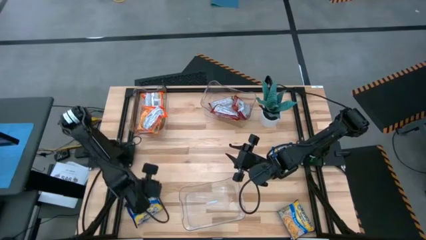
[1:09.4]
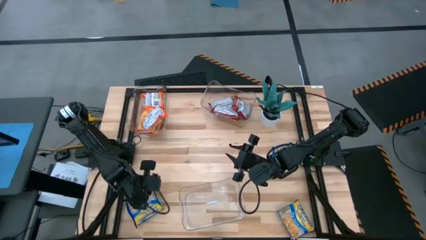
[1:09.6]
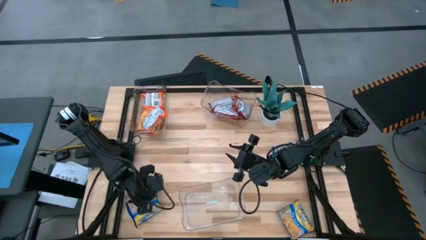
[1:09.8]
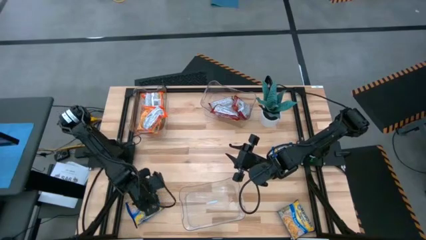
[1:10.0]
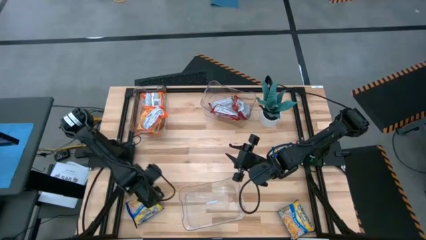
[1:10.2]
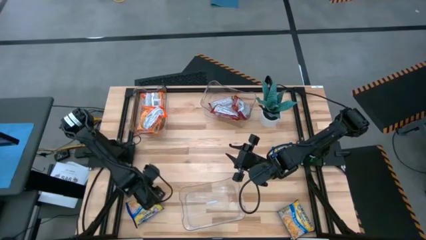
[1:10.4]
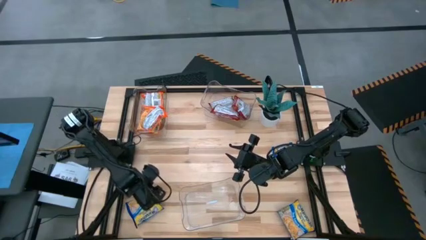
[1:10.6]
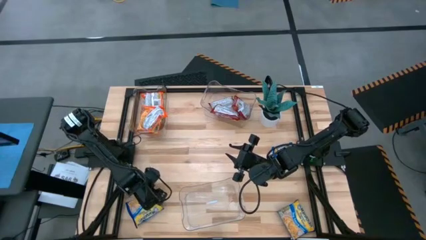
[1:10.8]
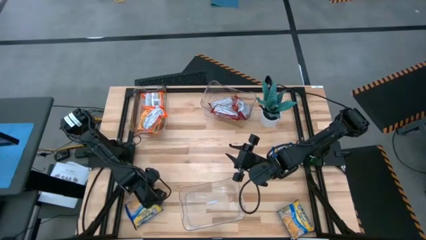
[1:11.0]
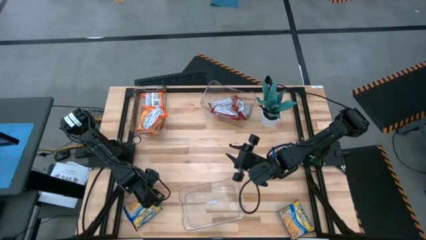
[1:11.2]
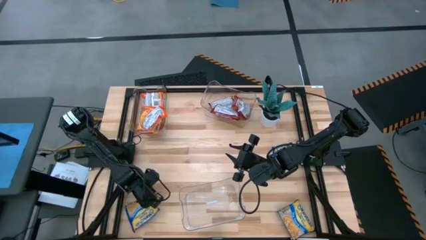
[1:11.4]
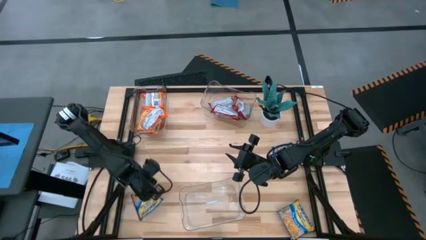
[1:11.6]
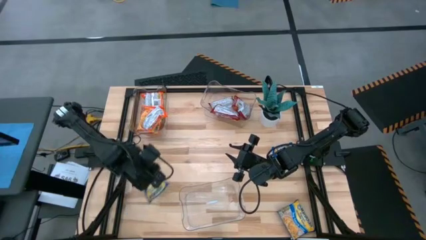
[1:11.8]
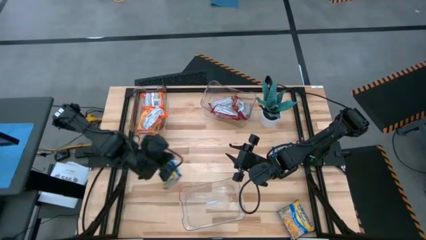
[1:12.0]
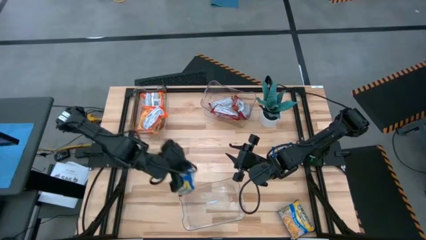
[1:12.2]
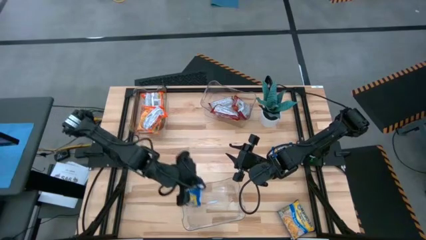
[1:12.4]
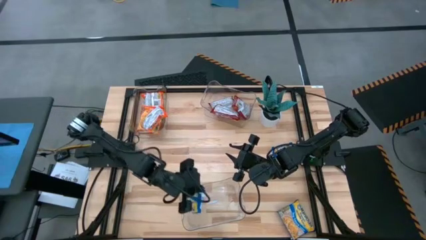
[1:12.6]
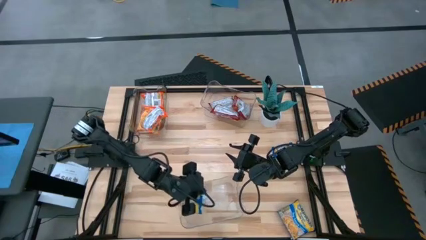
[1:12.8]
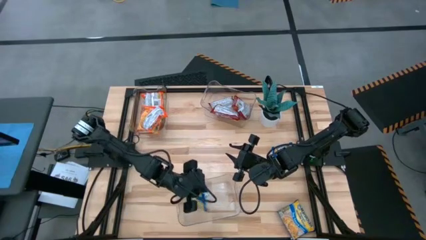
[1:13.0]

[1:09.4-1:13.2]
Task: Sort Maruchan noodles
Put the bottom left blue noodle pack into the bottom transparent bin

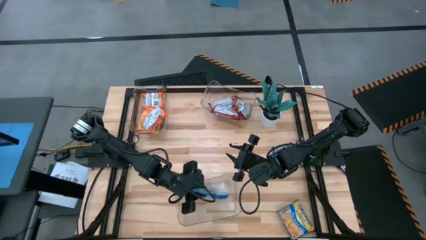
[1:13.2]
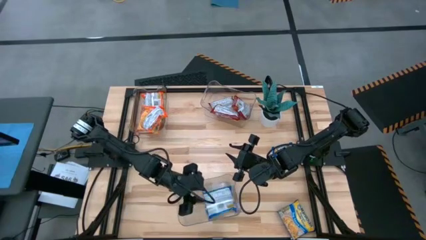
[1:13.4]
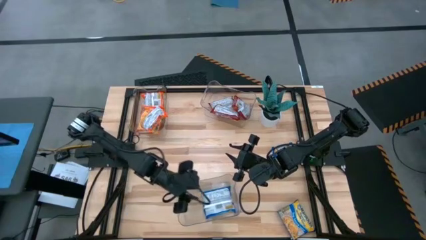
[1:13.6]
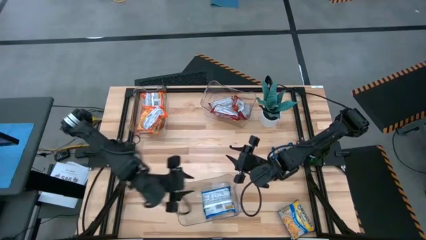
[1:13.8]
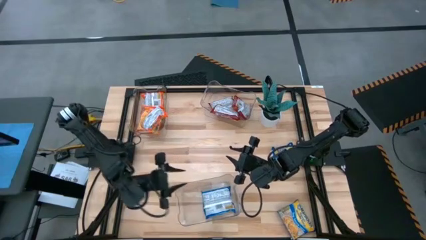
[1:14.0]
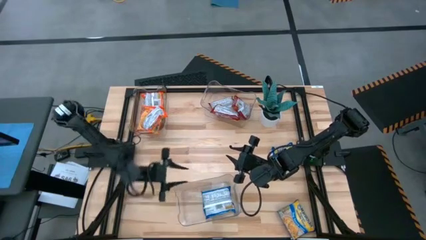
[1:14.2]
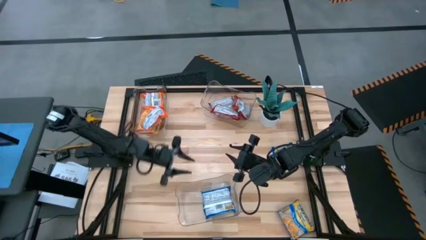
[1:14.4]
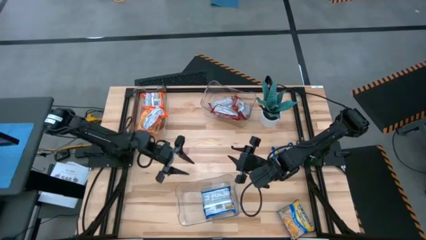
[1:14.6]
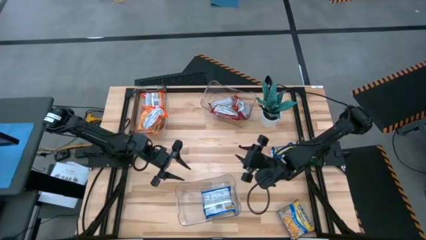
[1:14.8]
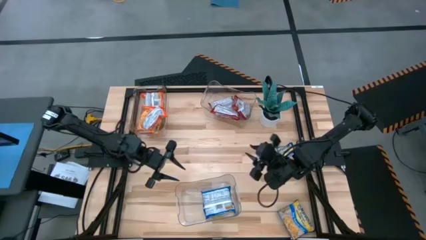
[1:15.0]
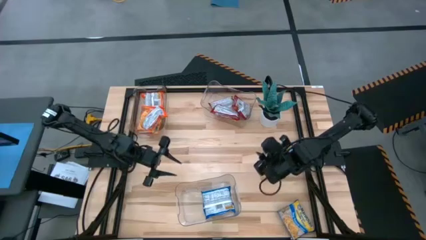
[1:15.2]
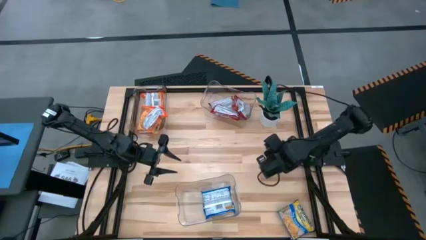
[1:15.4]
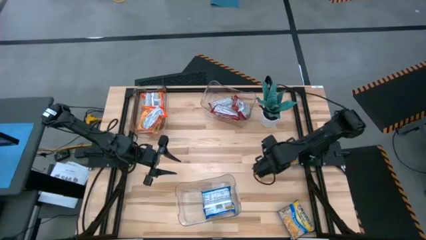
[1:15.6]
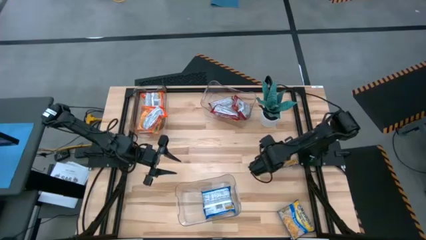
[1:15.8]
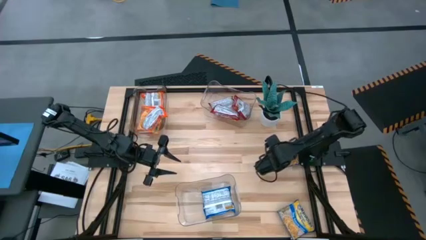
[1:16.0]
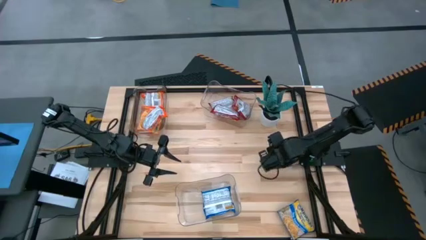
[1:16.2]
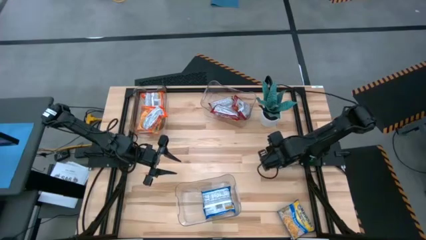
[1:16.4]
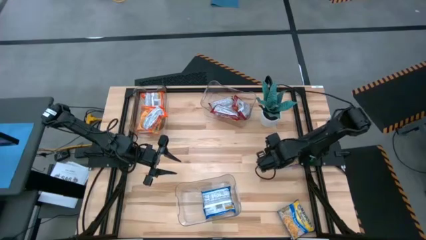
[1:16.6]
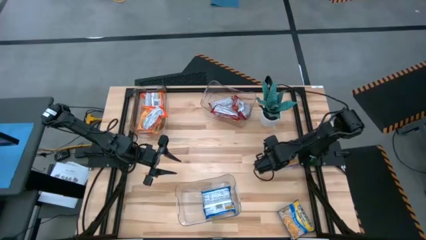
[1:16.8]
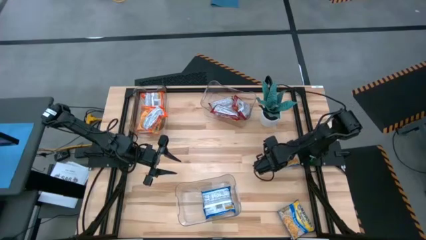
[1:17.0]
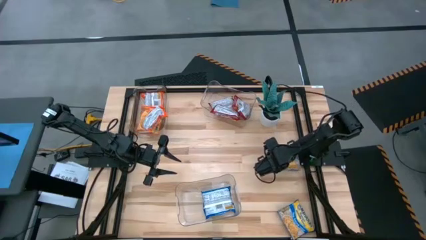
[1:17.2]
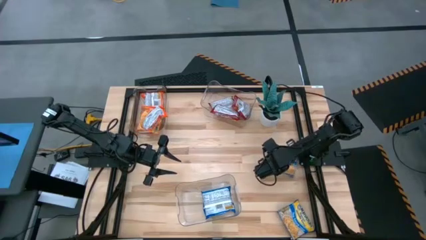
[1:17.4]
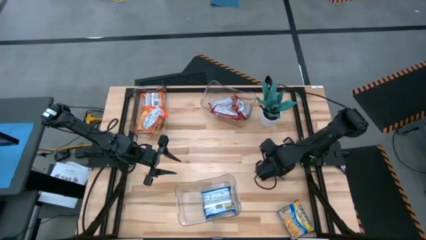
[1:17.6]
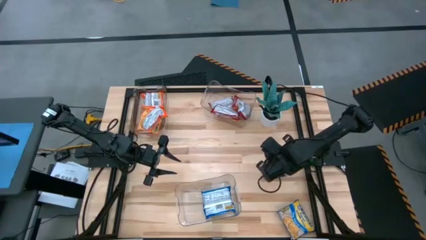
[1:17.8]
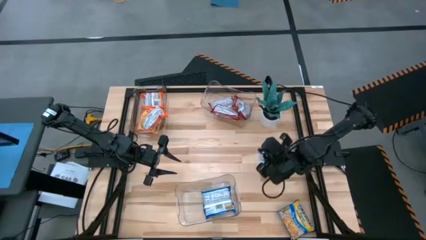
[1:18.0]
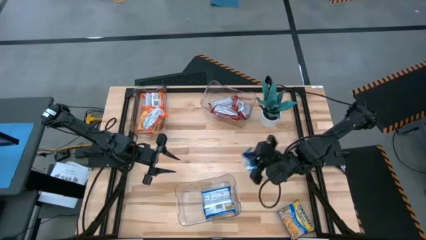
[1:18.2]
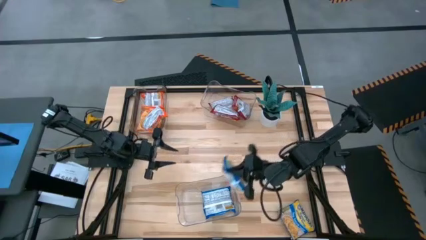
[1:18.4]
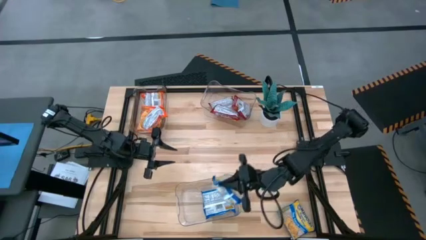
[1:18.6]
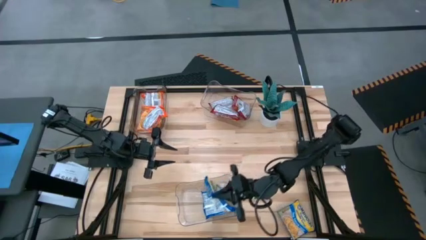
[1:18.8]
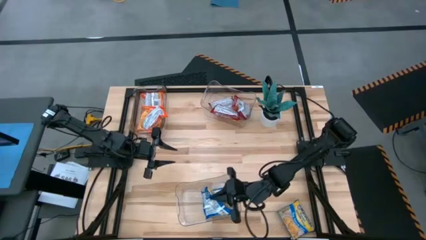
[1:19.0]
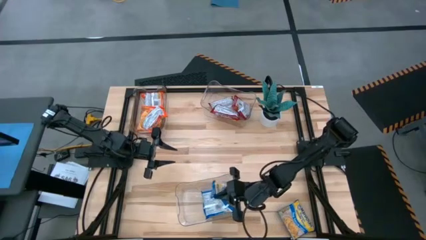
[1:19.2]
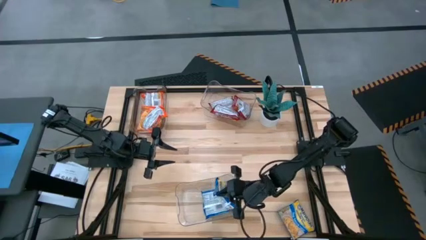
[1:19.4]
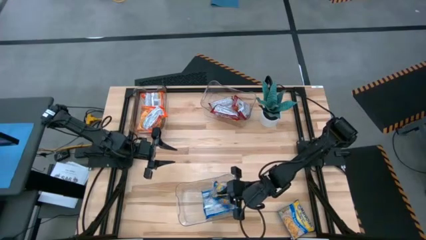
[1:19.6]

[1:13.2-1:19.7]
Put the top blue noodle pack into the bottom transparent bin

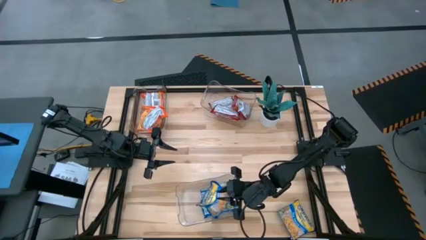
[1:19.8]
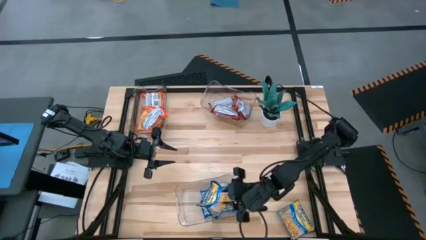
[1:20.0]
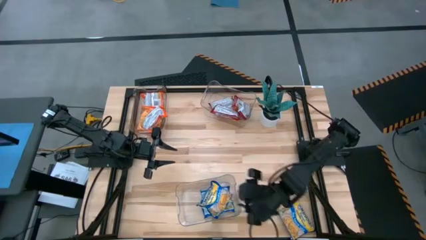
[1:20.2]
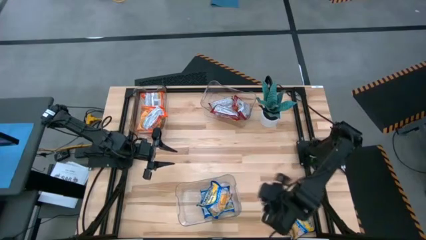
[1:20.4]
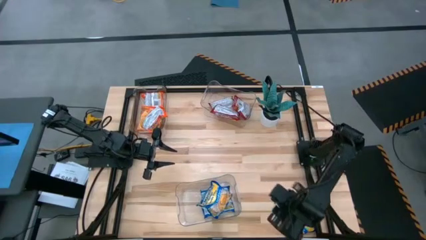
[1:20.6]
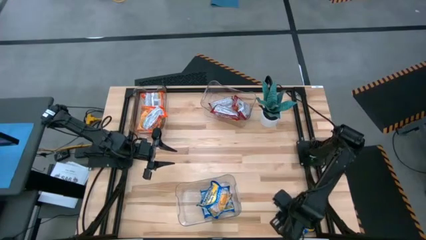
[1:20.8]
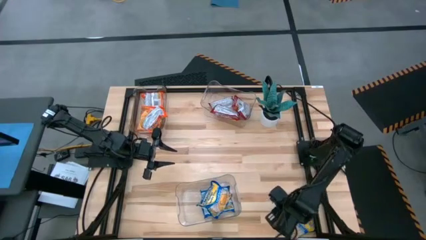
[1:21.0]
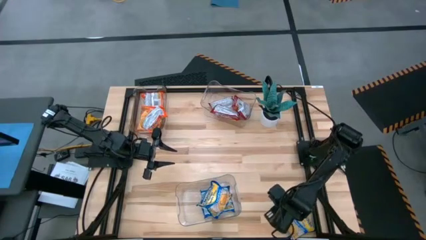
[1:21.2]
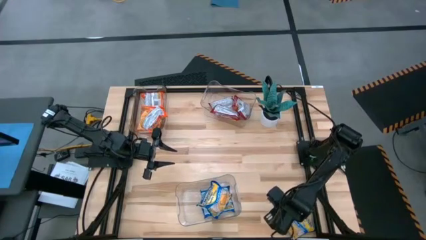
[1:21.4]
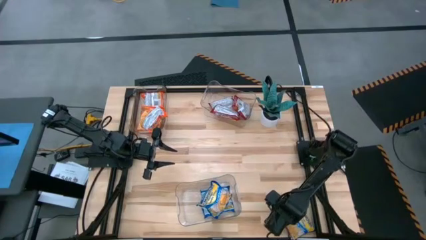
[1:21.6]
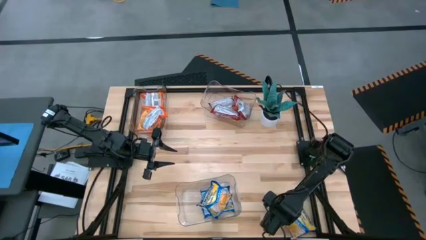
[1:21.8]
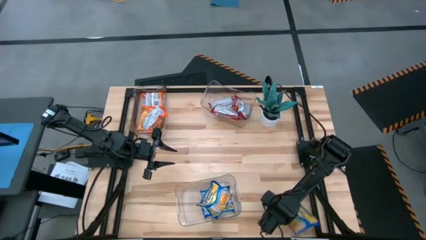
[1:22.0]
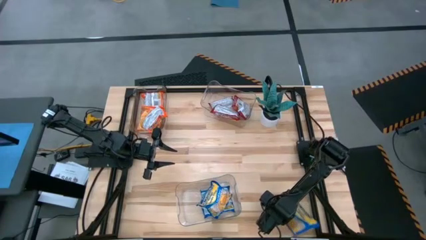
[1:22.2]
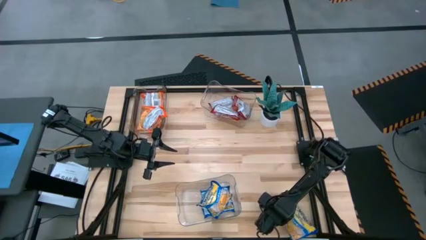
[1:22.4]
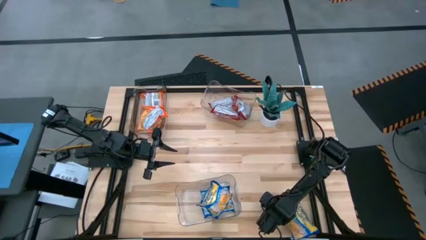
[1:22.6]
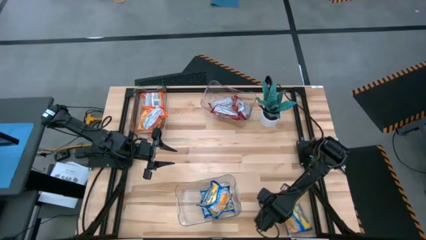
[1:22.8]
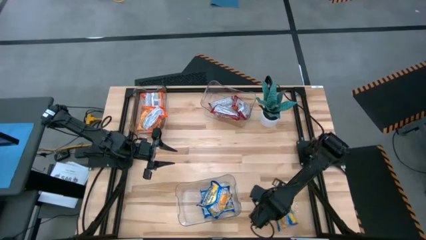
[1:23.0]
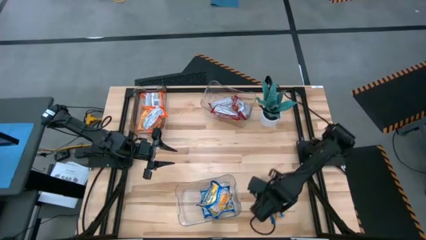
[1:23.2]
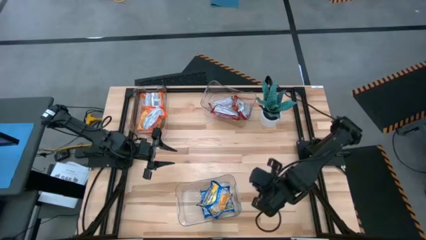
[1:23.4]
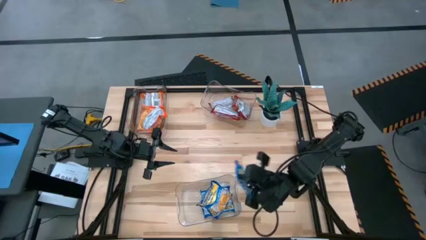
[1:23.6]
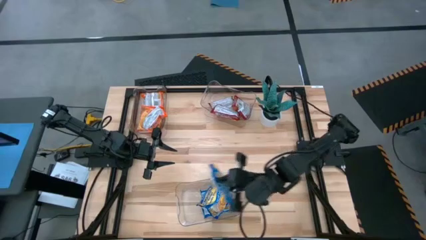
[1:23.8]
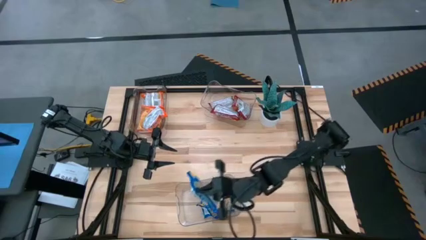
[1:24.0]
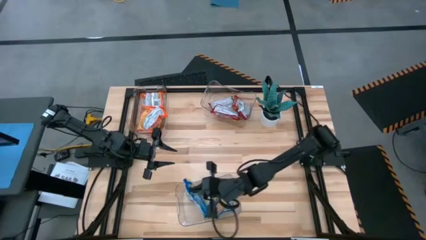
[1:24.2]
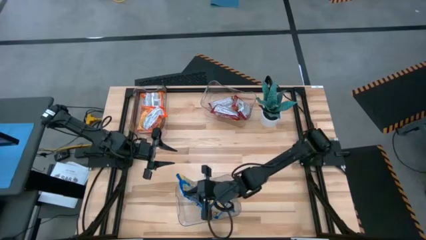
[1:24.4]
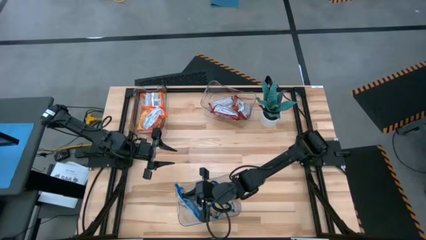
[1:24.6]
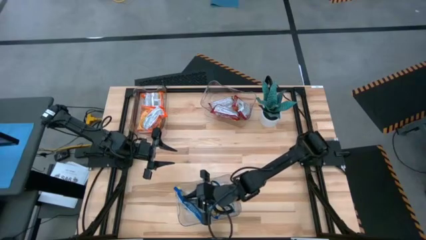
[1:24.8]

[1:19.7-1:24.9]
Put the blue noodle pack into the bottom transparent bin

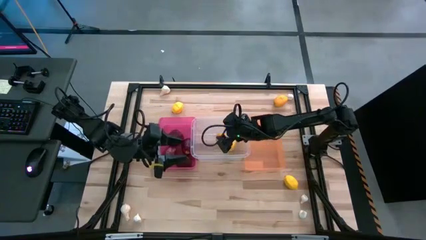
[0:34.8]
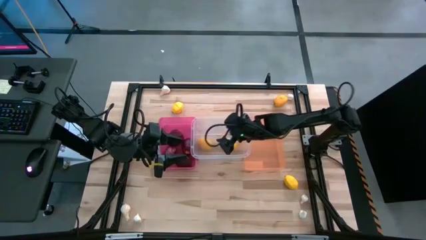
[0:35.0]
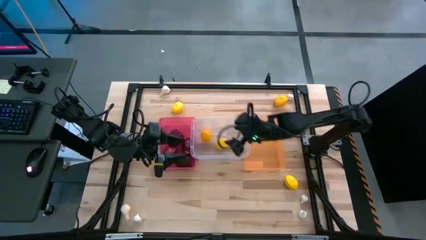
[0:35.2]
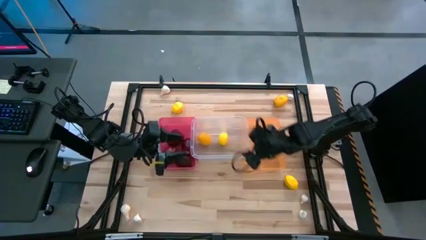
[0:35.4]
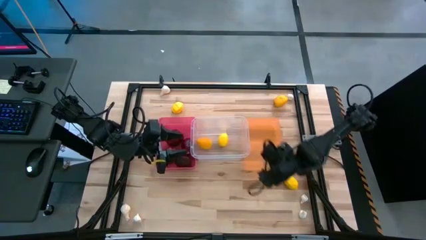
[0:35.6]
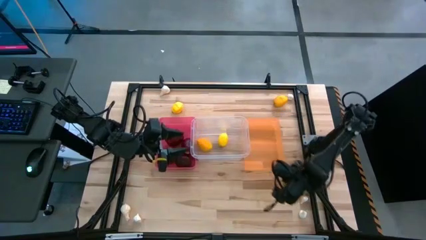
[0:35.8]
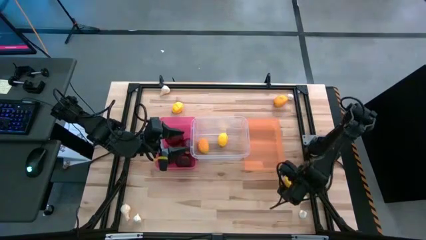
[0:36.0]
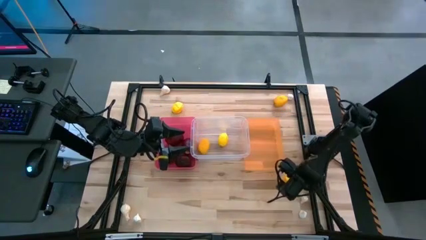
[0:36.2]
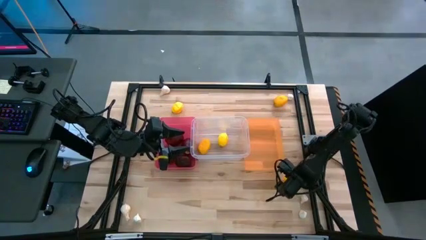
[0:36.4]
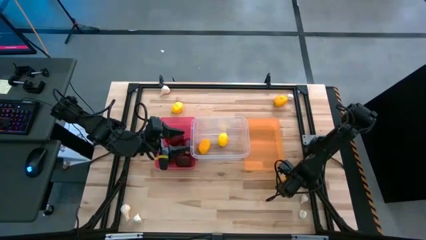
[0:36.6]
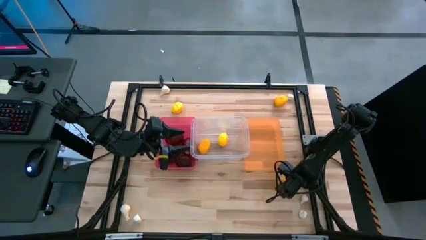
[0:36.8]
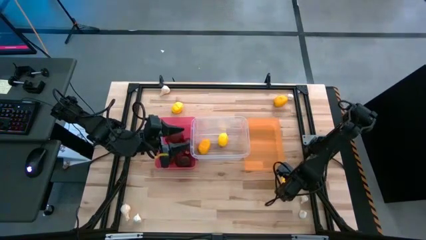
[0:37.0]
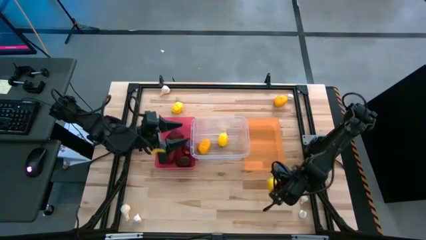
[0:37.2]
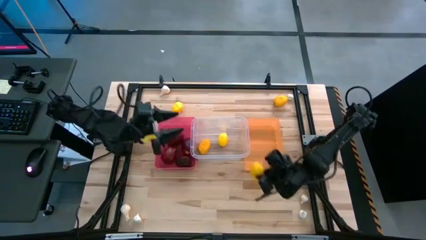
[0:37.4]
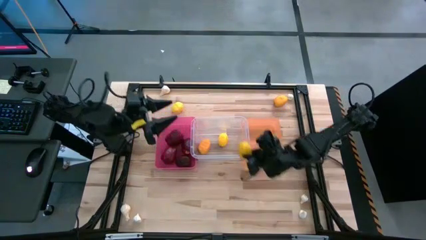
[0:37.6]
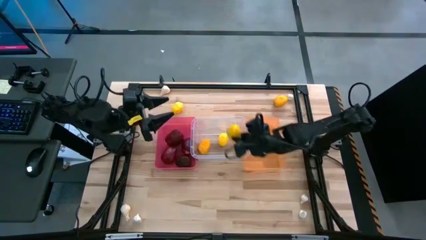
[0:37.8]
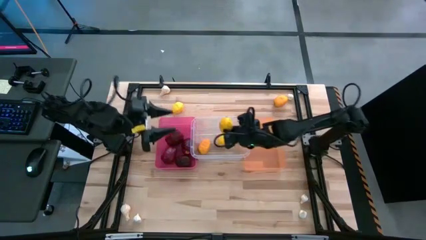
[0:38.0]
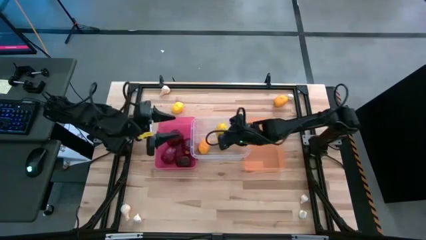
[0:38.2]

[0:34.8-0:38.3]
Task: Sort produce into baskets
Put the yellow lemon into the transparent bin
